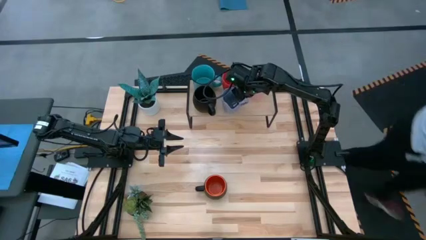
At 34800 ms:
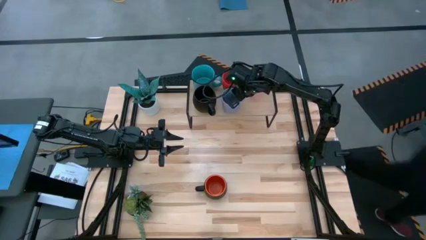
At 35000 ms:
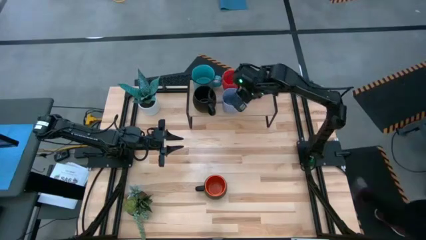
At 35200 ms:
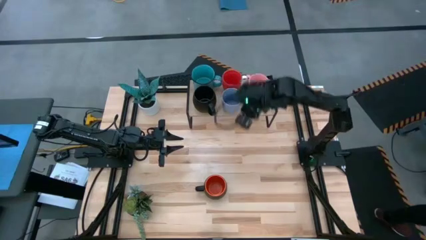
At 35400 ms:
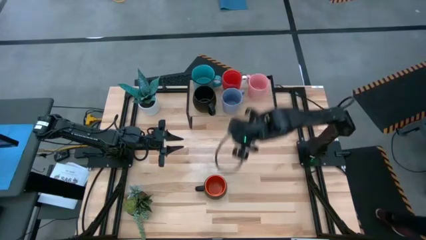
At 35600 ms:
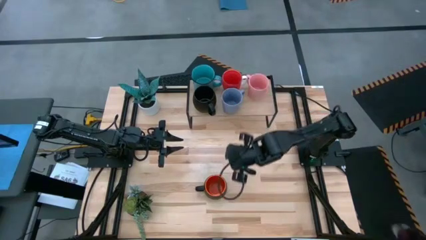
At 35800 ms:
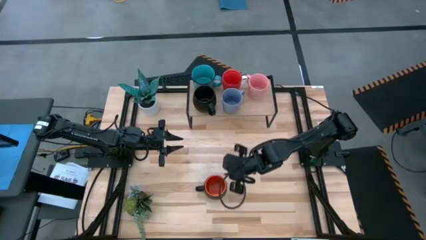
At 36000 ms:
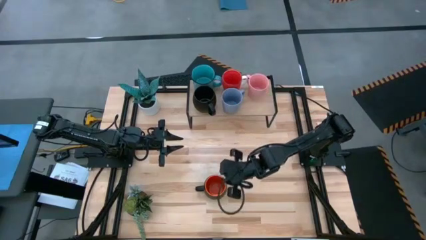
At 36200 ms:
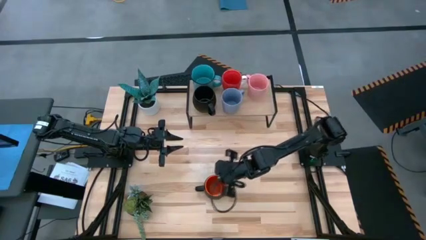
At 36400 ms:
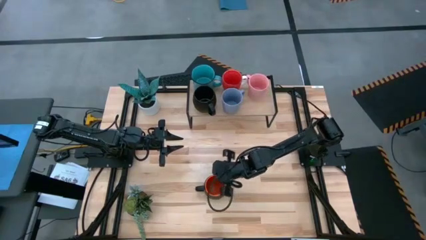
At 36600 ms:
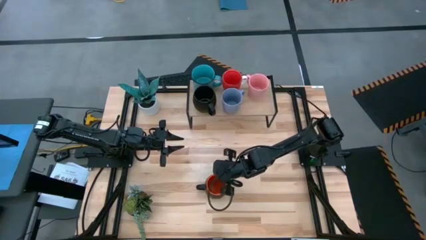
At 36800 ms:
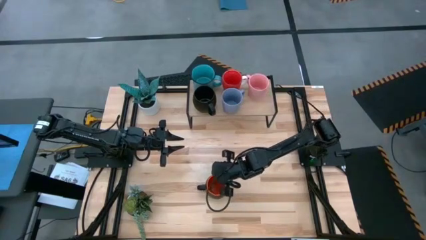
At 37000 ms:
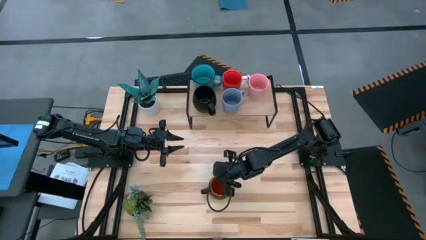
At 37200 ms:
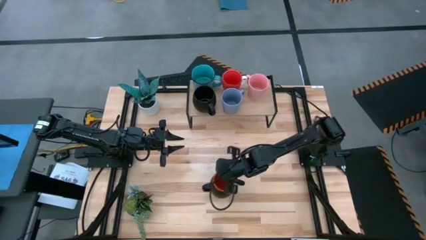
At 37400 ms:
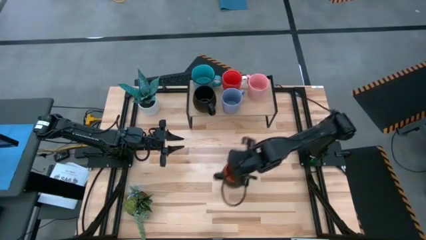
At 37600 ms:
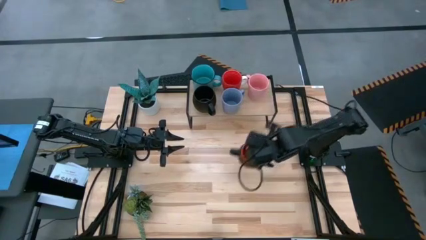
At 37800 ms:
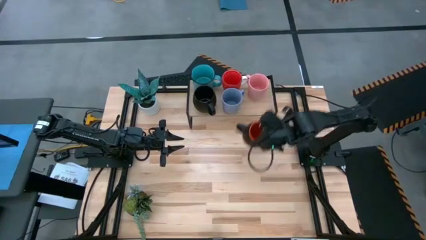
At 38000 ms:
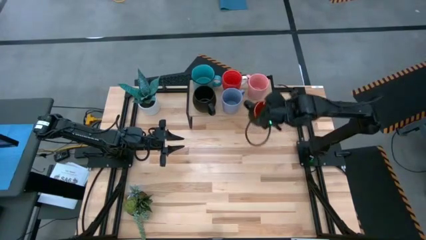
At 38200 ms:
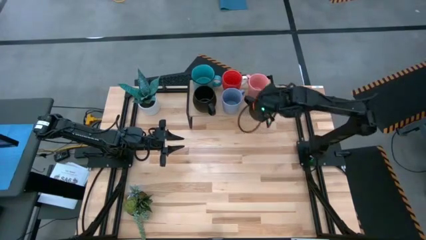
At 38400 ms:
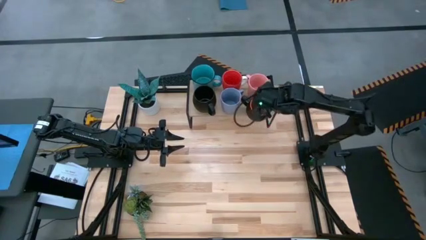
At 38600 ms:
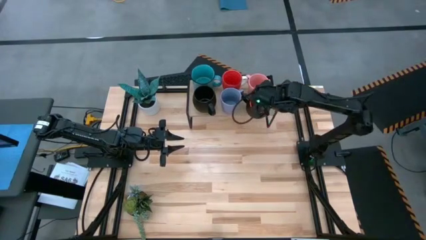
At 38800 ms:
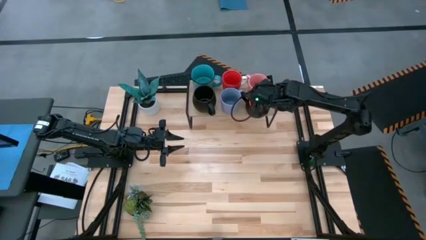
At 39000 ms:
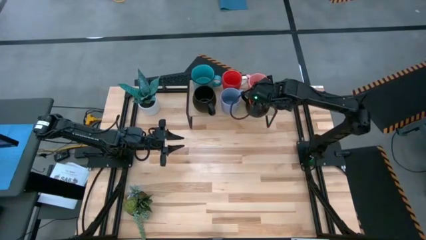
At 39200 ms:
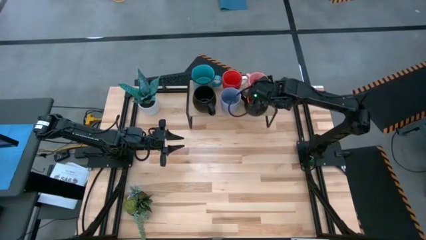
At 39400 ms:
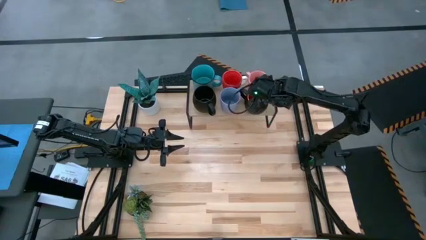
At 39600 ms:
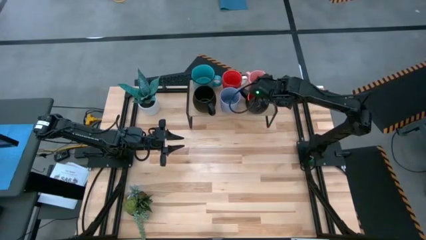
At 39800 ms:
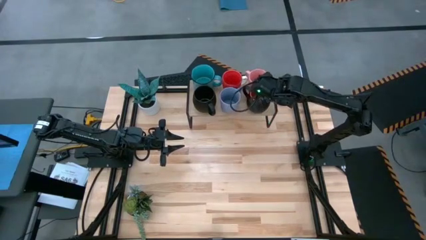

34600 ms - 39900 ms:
Task: Place coffee mugs
Put the black-orange mug on the shelf

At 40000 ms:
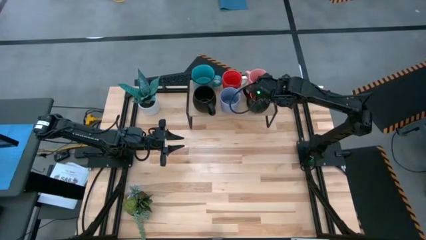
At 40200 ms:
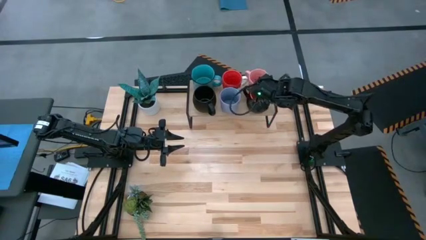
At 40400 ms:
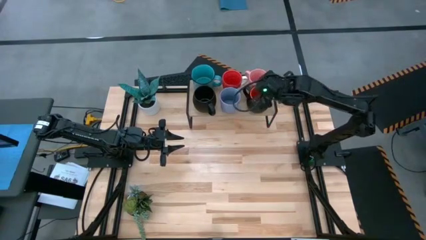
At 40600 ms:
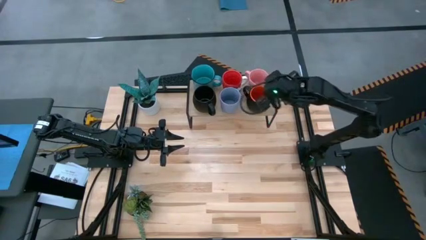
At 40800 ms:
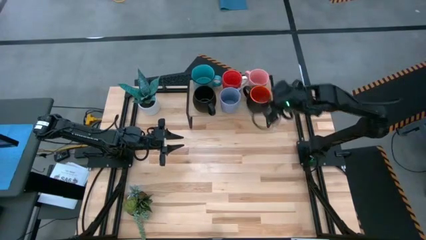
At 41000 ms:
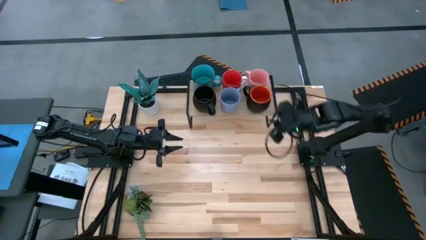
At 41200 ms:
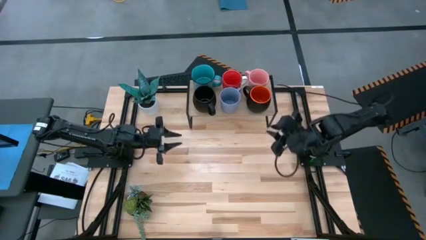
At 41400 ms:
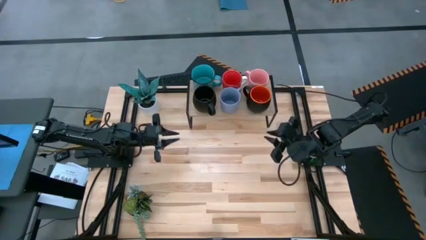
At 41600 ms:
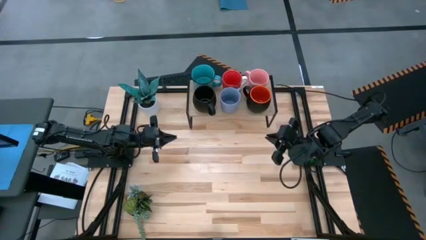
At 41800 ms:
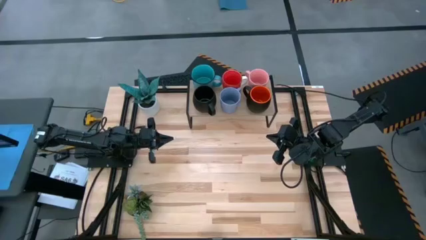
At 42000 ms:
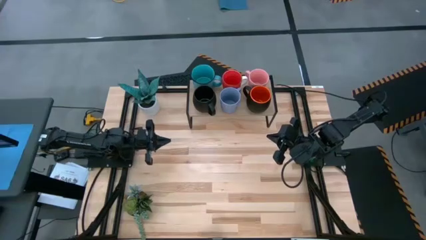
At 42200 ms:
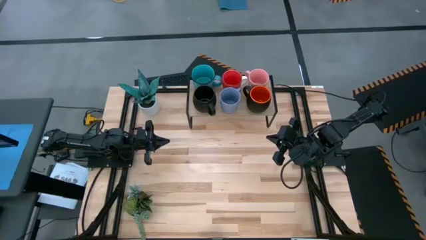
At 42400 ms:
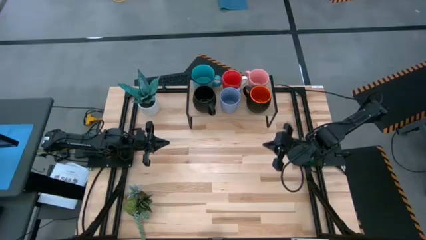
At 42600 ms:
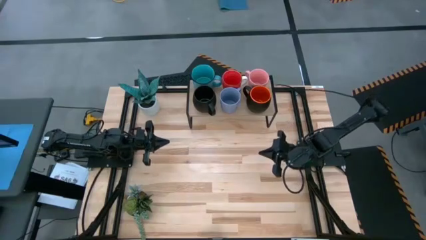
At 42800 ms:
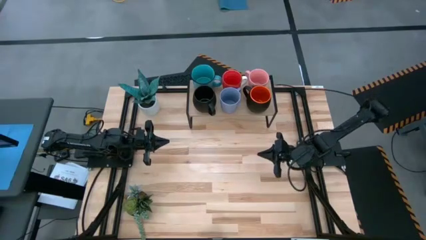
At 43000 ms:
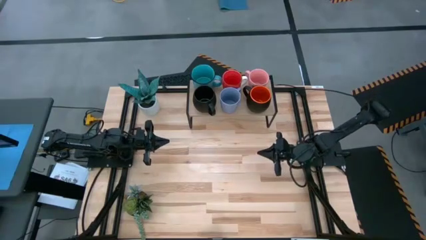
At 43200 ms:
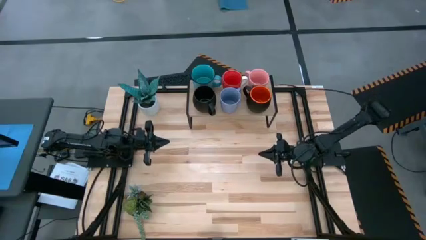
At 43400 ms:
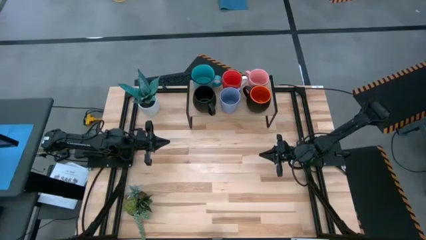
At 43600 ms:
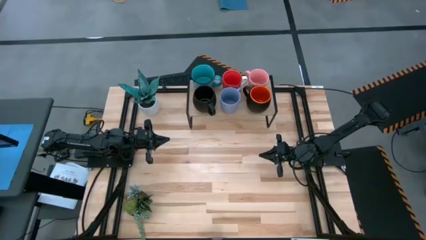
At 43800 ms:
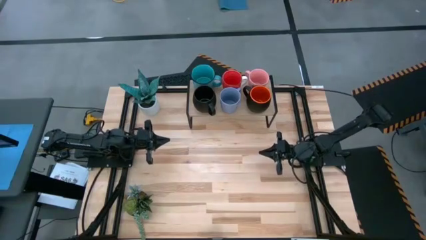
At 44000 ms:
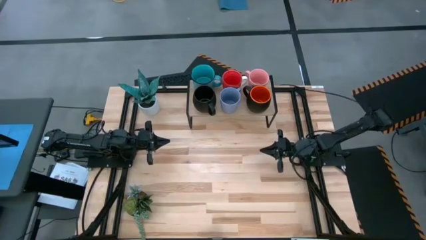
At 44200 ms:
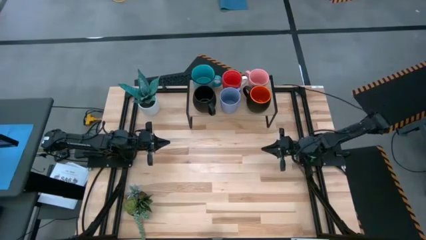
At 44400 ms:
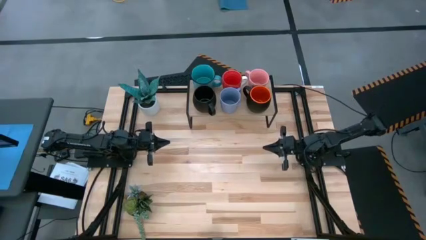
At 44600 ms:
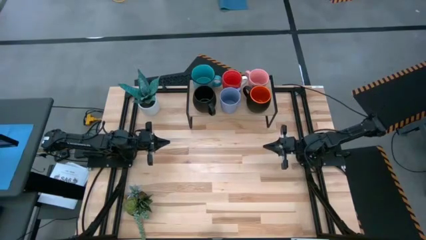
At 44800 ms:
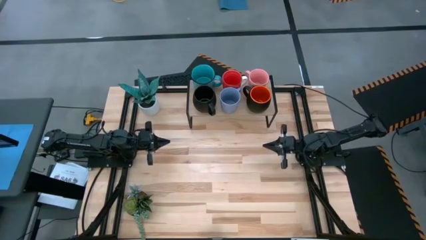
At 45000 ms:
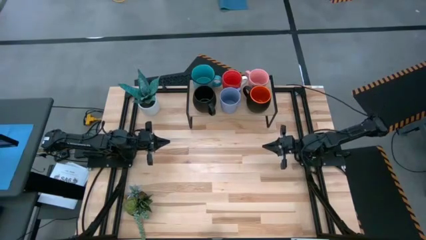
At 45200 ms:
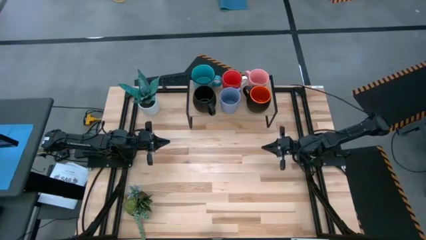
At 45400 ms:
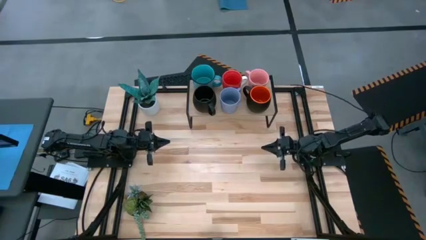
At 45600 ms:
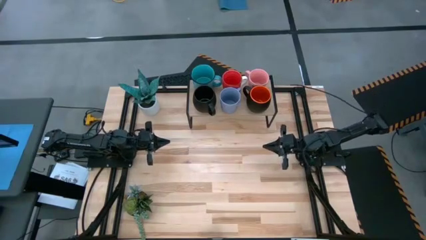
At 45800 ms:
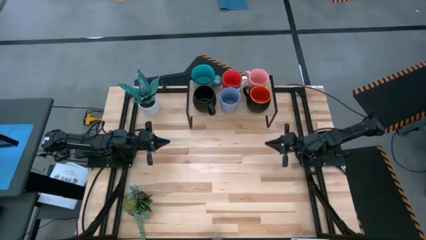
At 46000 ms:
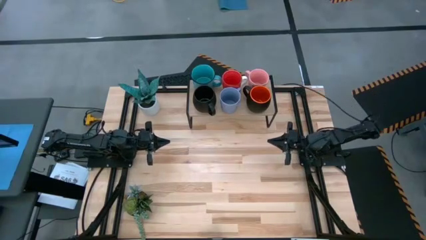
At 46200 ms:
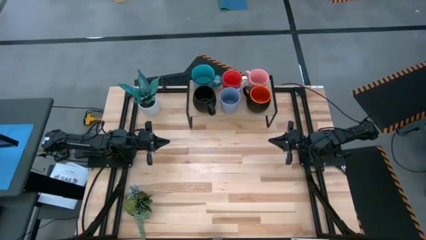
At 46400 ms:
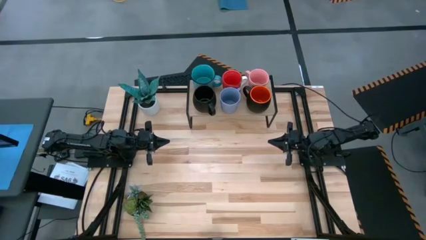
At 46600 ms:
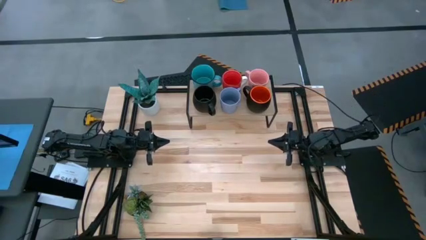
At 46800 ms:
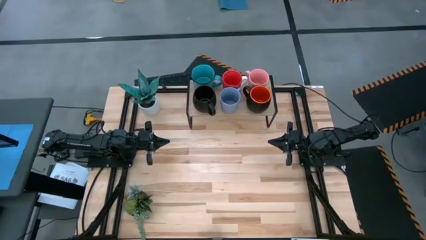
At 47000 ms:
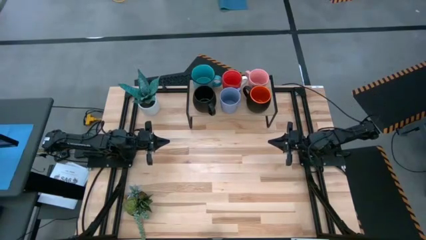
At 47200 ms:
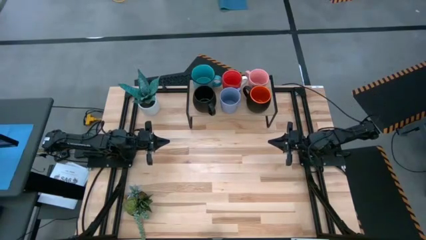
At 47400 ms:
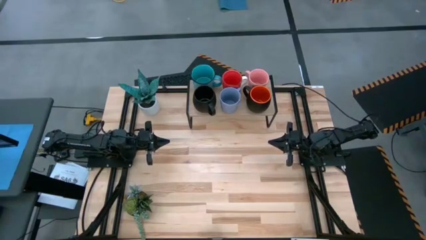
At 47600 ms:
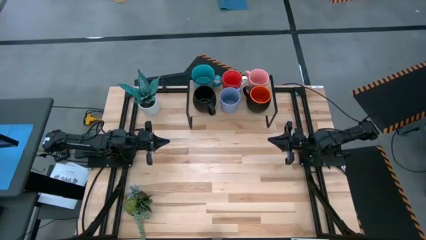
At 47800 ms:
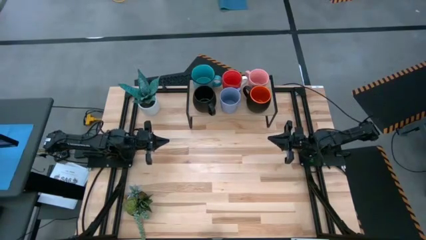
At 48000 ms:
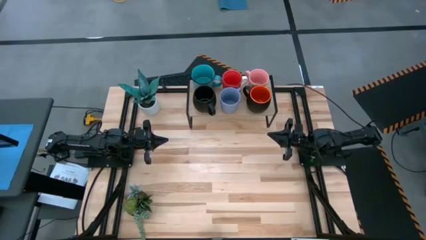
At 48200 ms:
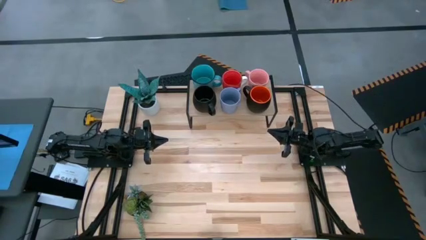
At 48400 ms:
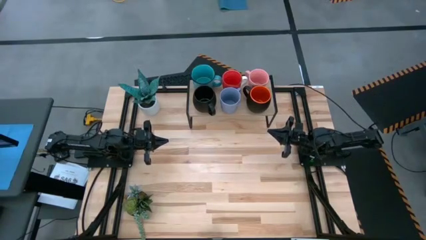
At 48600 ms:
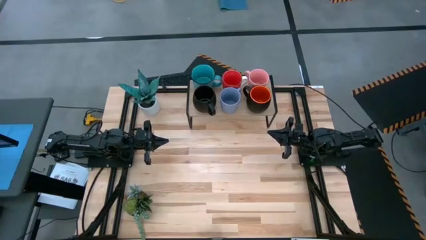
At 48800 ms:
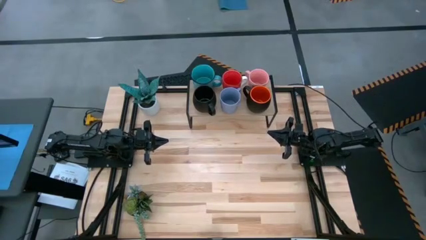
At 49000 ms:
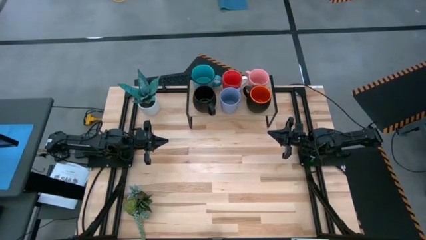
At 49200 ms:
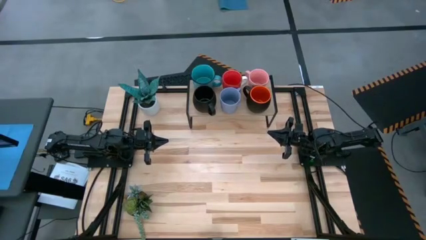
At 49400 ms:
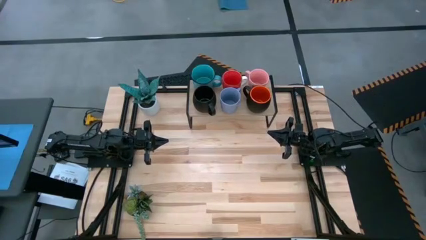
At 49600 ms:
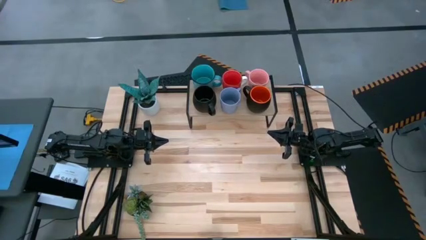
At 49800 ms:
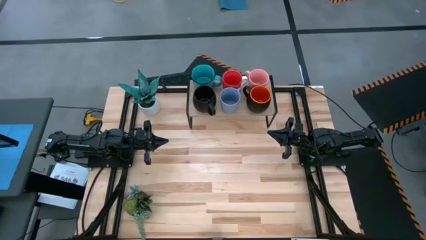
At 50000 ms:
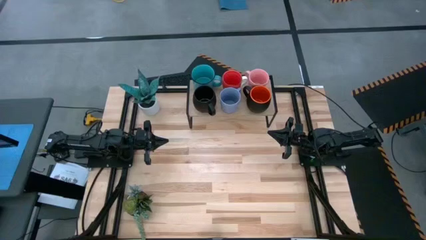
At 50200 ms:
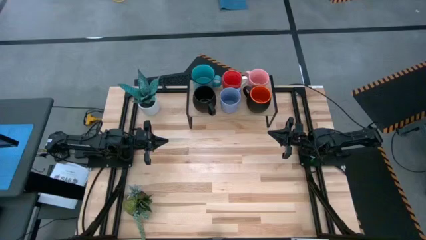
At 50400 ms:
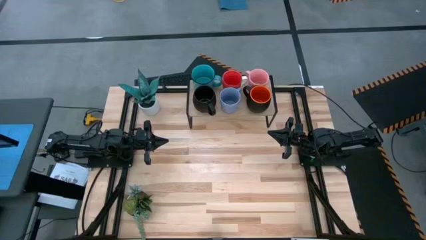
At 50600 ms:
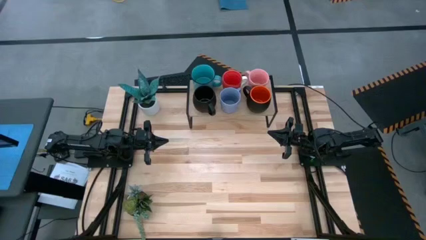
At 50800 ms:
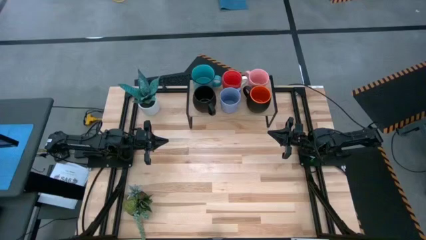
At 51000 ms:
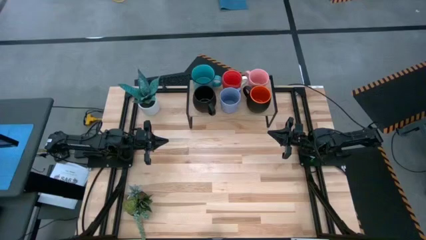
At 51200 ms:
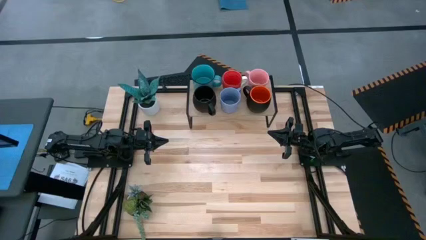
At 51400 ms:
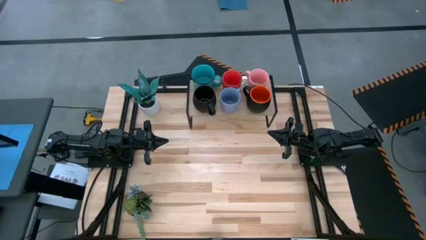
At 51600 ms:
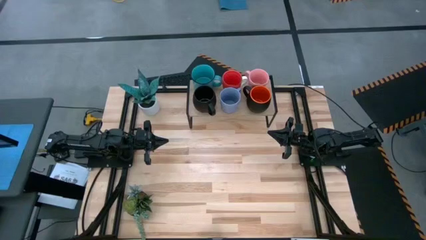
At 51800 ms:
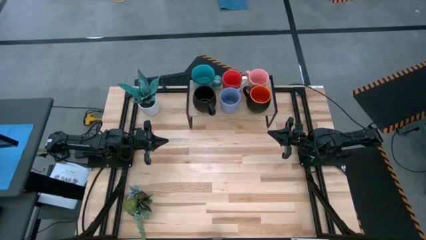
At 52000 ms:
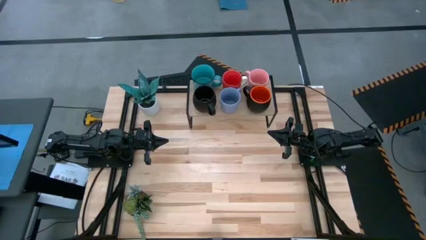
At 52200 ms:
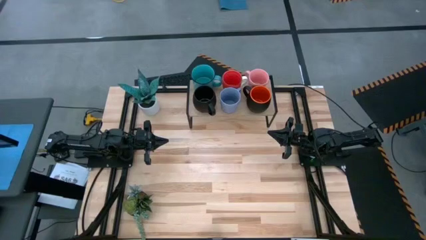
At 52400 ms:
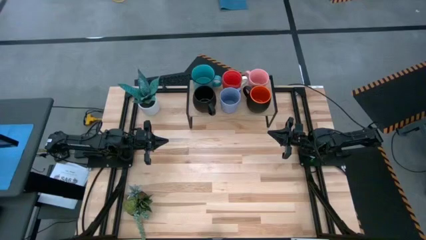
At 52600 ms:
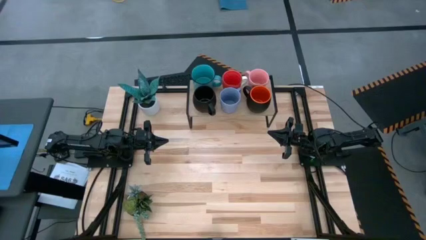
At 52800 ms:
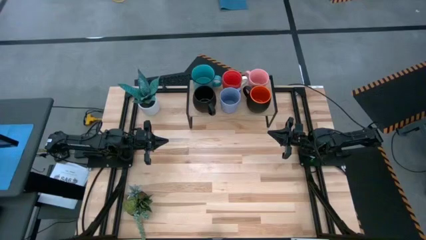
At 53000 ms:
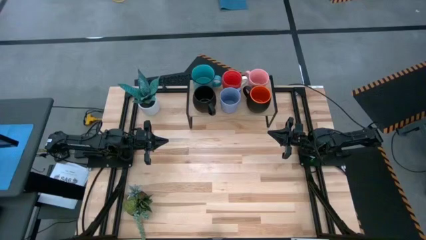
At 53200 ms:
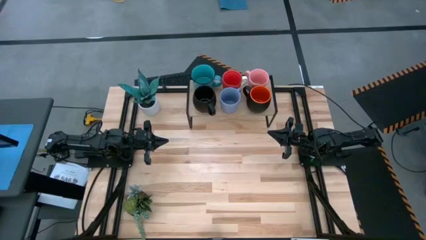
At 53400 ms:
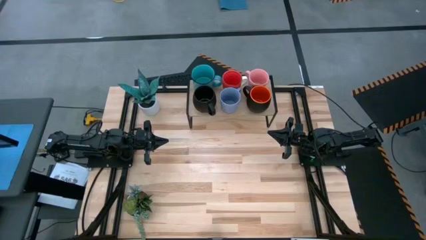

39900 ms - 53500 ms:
Return to Home Position
